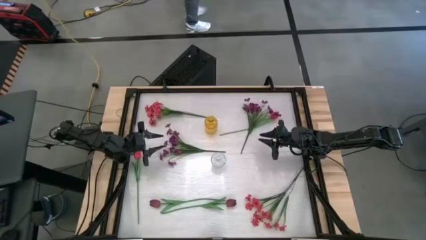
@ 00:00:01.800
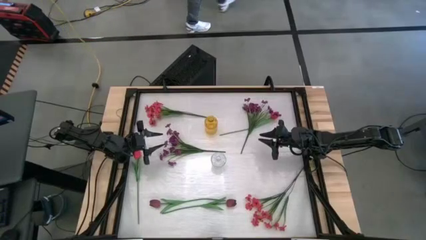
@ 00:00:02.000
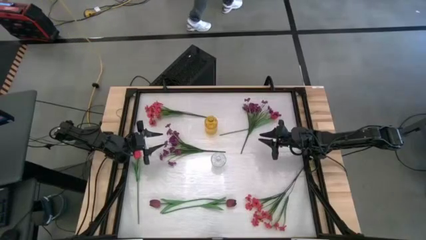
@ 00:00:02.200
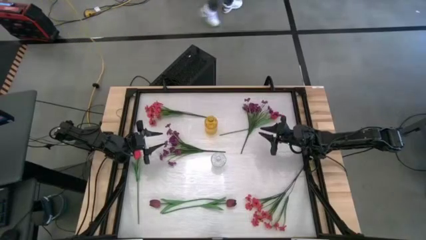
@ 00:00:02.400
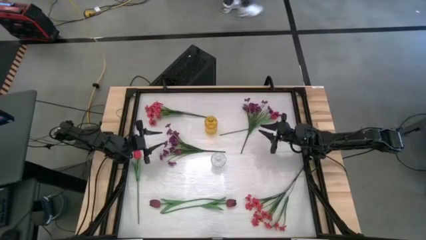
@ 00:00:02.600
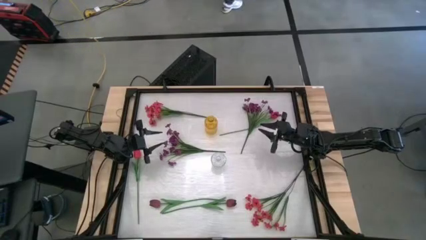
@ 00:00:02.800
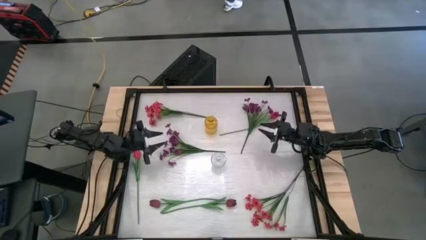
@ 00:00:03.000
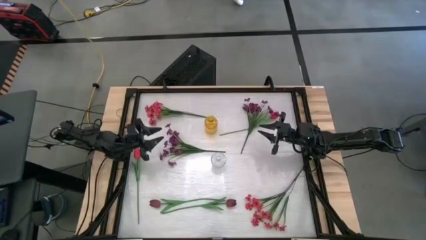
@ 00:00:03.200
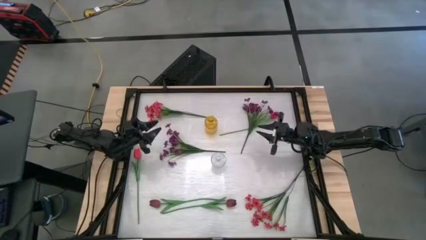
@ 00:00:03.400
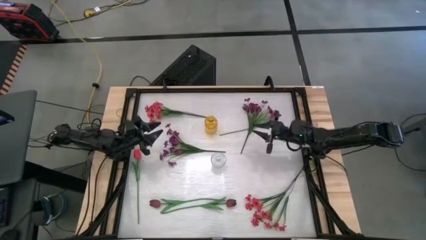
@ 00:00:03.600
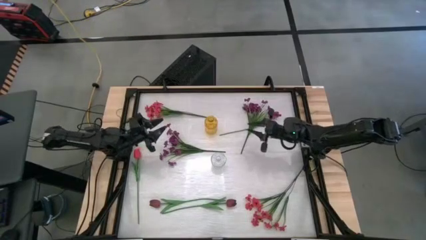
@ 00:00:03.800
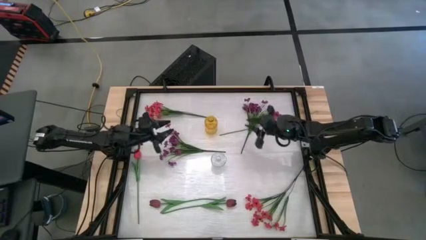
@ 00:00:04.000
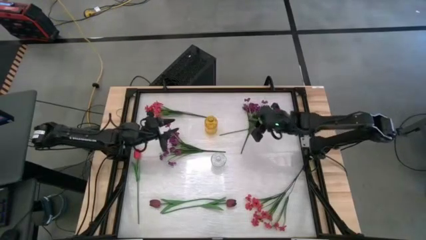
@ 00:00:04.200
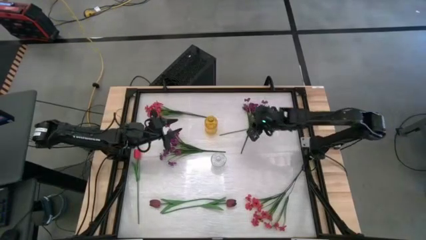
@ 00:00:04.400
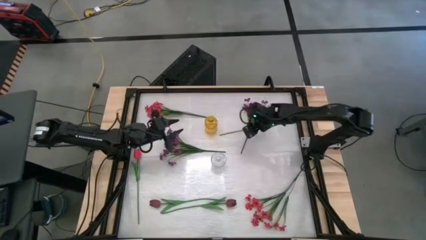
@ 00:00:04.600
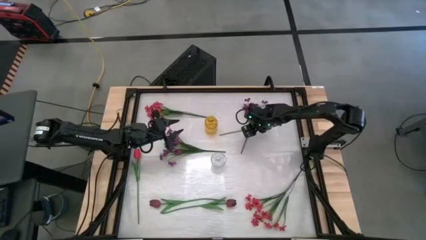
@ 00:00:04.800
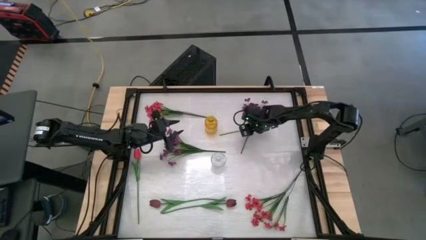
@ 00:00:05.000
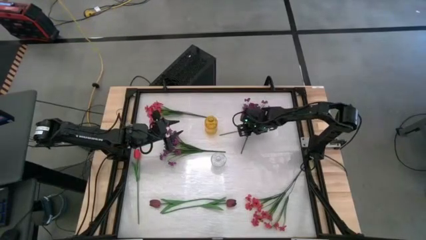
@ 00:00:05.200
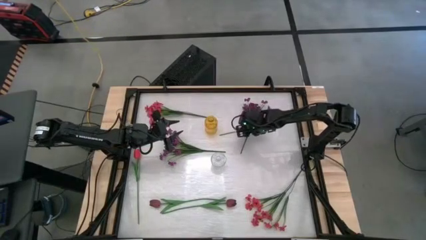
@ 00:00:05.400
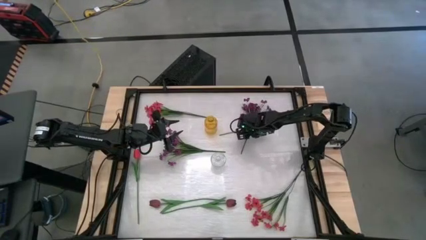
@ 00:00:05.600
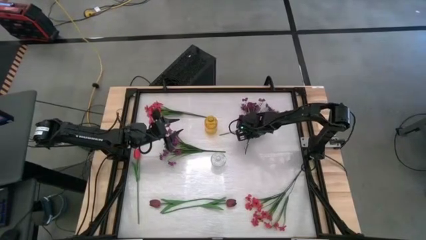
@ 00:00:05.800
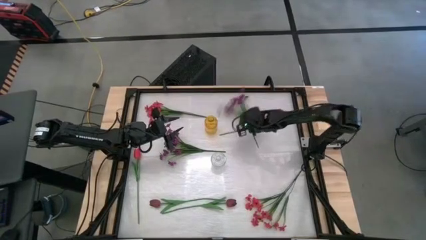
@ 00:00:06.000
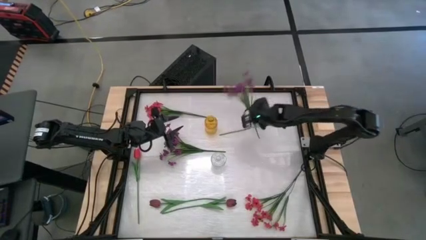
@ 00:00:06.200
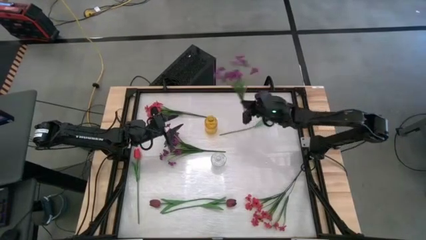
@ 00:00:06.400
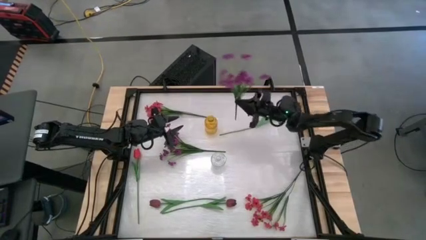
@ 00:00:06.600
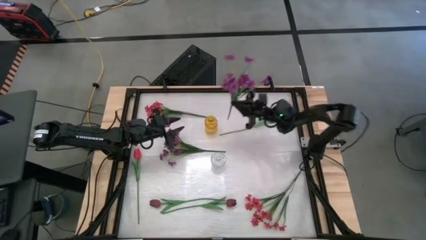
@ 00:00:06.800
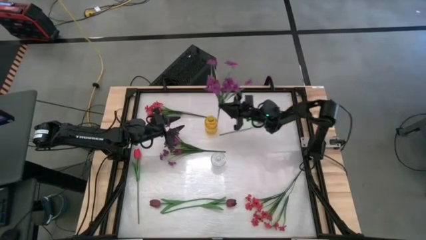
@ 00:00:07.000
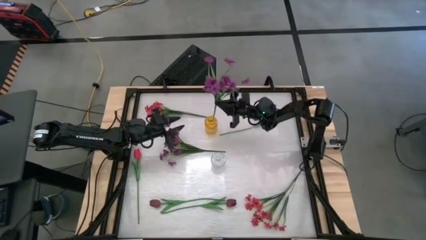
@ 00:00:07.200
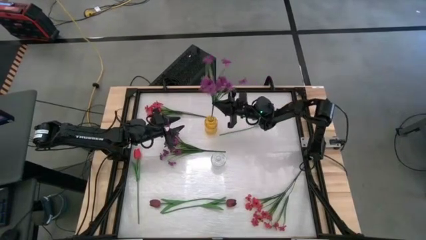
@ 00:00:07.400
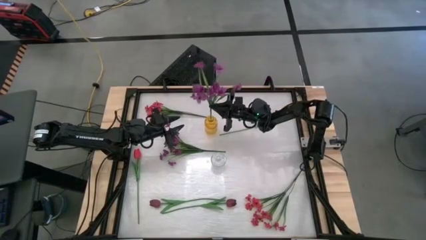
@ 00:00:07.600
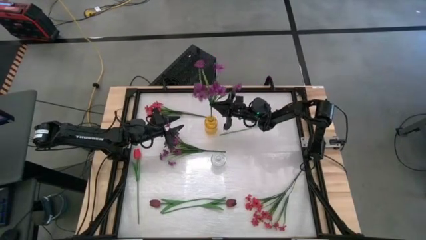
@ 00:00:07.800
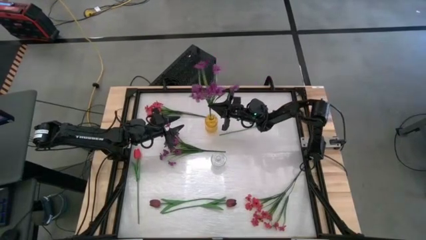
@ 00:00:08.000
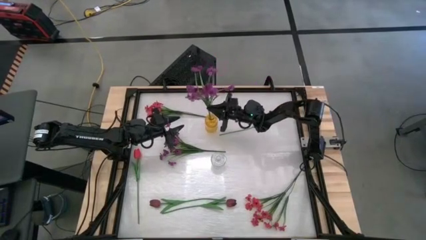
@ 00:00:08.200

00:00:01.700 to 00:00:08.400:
Task: Sort flowers into vase by color
Put the top purple flowers into the yellow vase

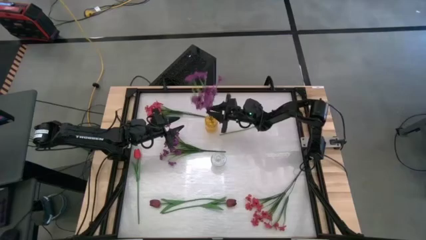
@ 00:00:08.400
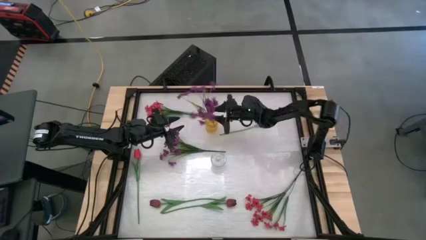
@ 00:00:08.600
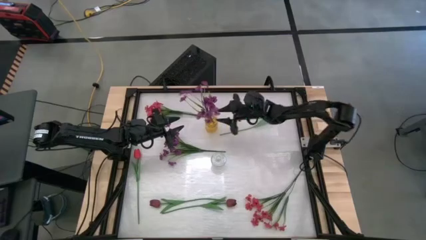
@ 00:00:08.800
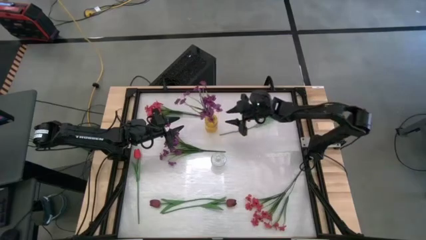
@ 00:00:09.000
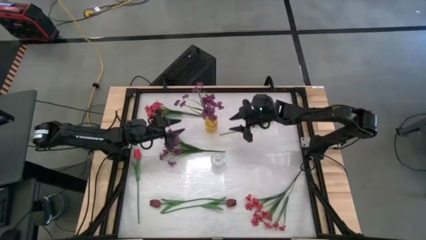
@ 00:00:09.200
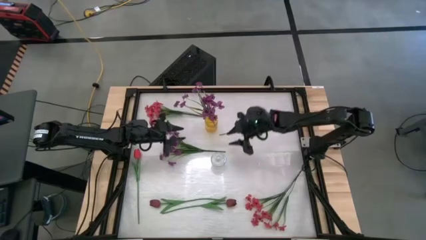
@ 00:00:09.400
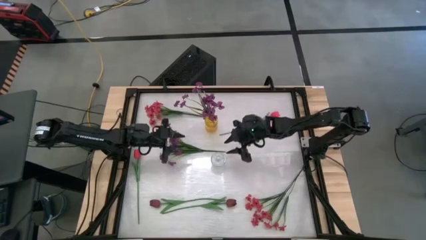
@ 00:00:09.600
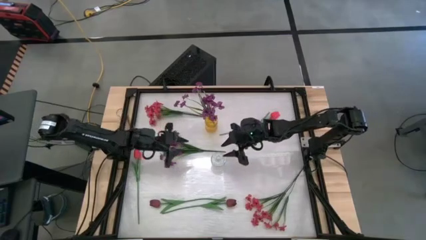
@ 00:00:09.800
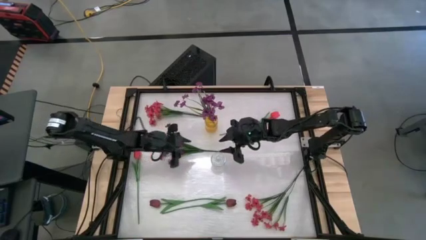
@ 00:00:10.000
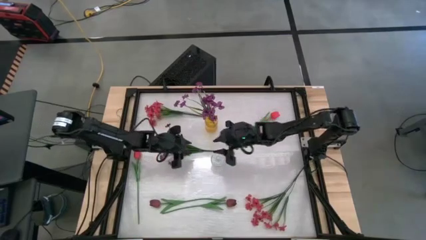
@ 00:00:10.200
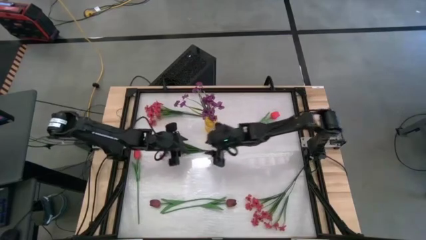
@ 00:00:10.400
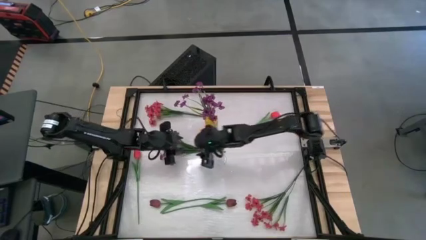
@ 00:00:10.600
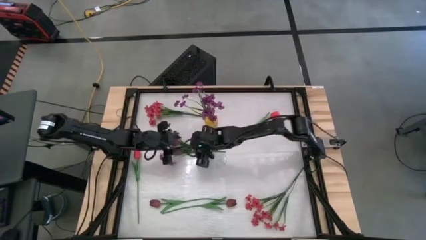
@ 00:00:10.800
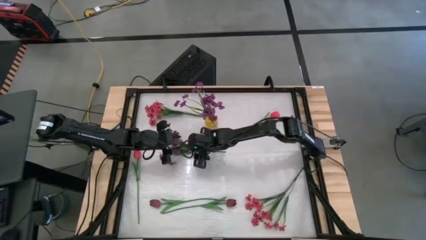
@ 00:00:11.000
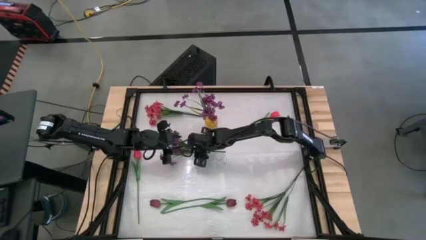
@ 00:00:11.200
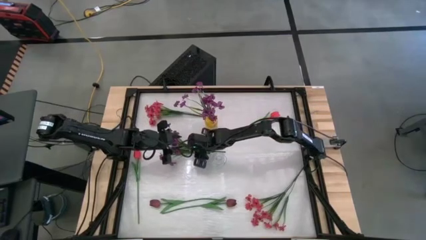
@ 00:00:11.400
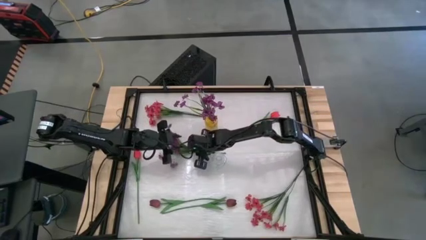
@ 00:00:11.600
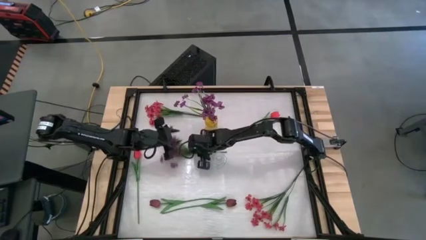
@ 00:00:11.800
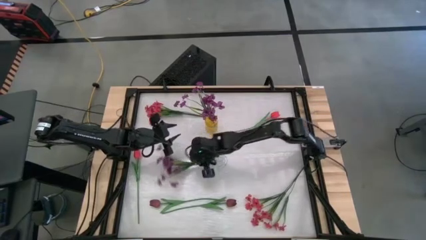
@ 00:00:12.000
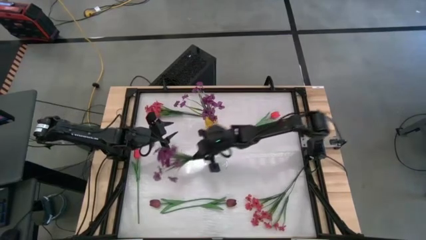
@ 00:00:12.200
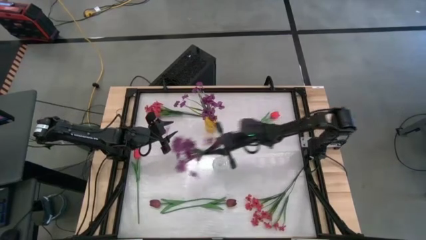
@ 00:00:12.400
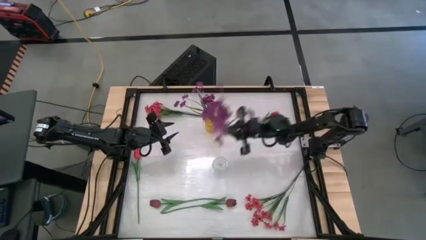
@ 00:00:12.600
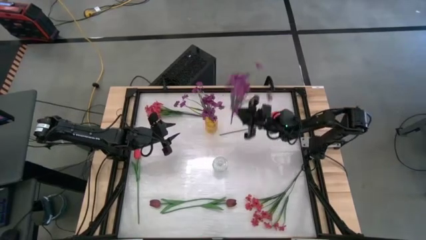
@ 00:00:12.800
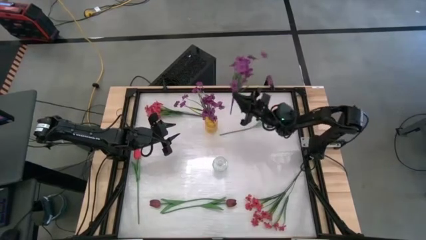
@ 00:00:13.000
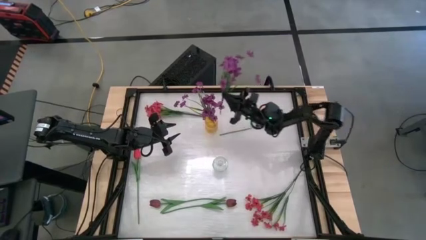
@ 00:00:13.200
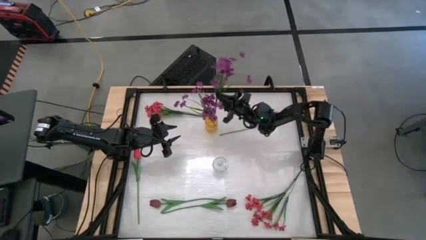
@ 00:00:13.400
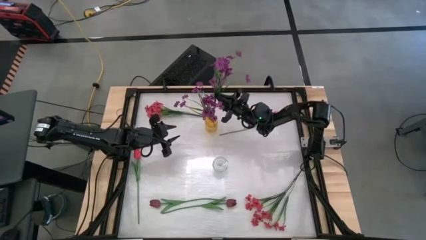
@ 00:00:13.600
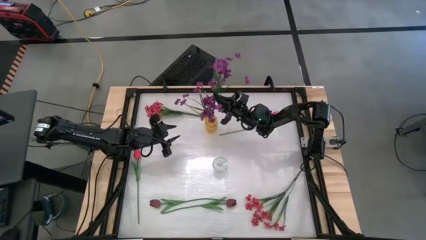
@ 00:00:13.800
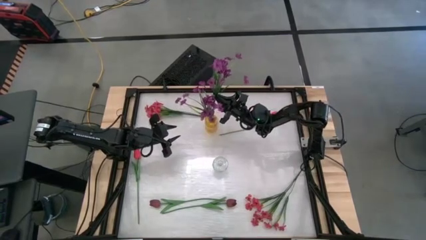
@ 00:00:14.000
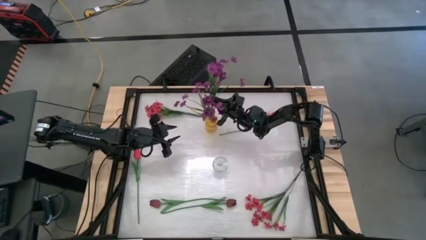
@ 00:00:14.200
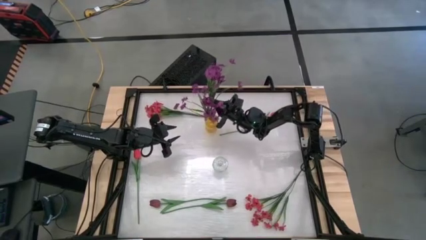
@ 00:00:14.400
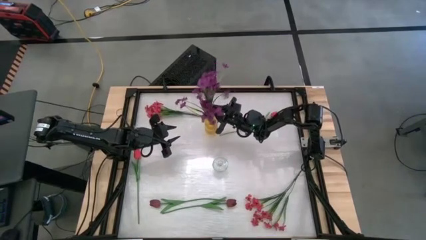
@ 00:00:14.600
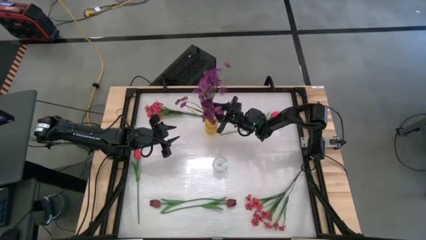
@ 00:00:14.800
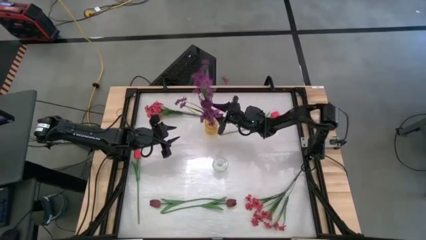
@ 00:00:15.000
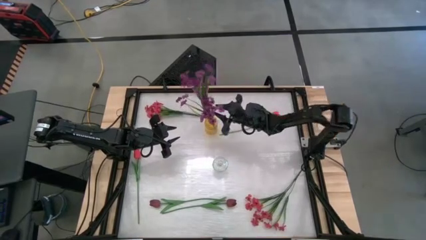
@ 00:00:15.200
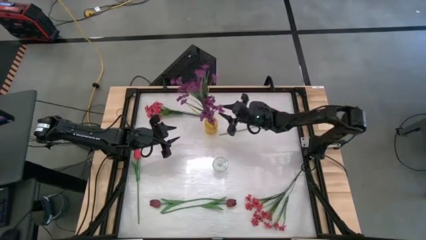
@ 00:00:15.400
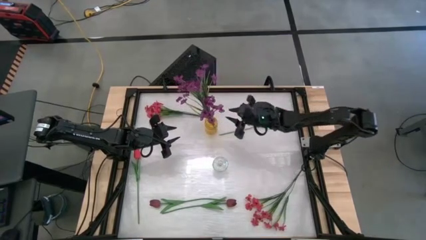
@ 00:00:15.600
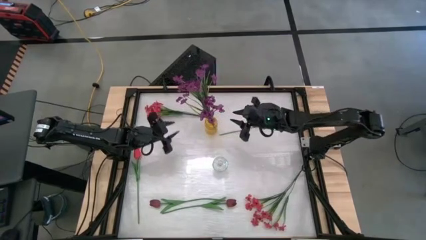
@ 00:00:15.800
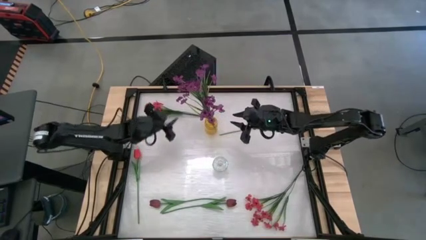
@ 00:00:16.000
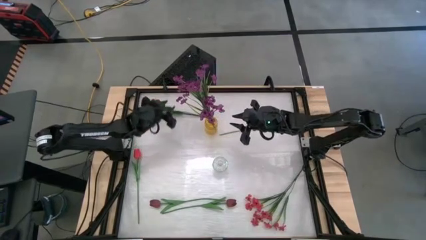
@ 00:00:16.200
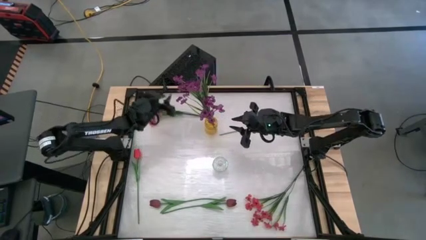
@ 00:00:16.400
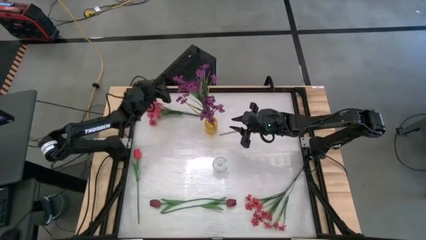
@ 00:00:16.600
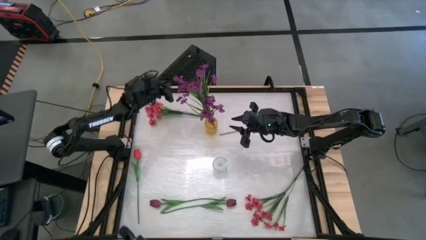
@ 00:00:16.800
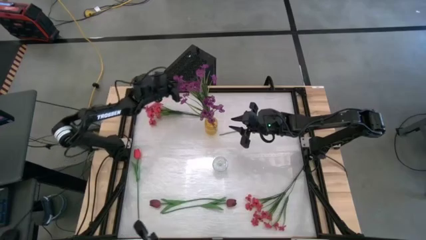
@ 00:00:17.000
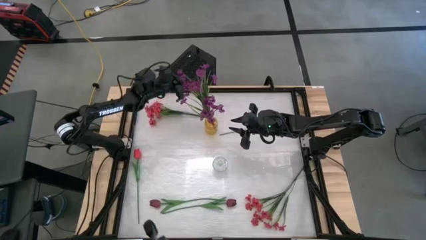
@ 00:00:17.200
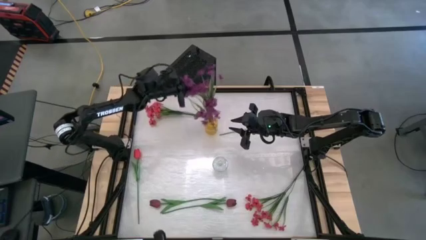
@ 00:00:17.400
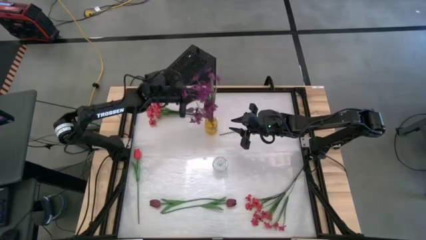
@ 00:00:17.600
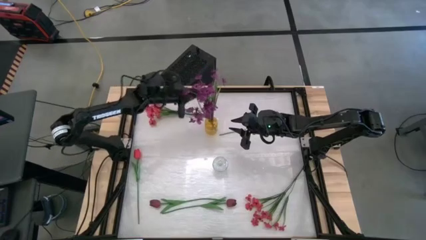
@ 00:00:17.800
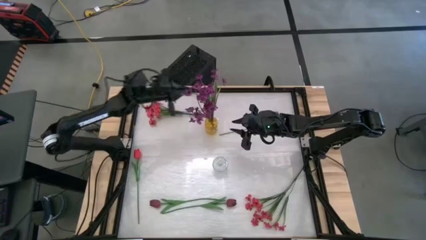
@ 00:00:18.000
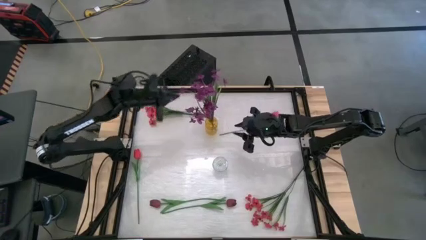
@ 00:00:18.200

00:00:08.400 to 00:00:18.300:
Put the purple flowers into the yellow vase
